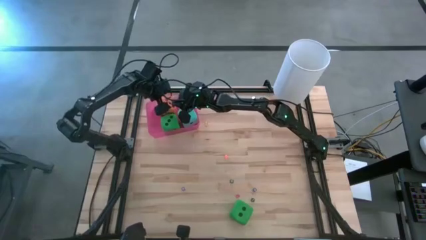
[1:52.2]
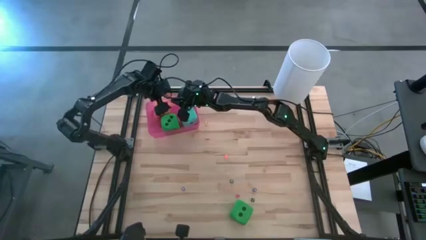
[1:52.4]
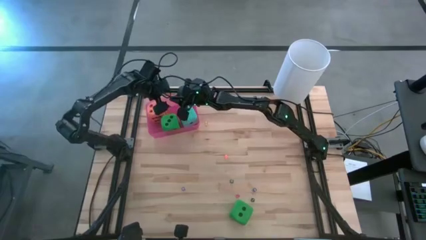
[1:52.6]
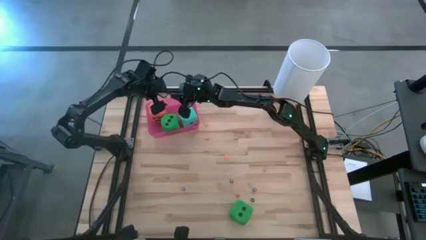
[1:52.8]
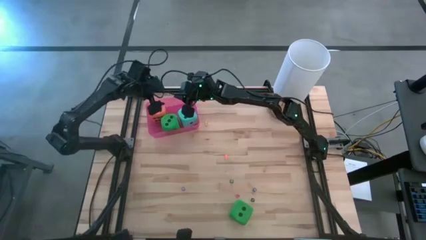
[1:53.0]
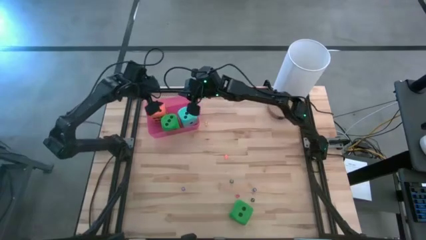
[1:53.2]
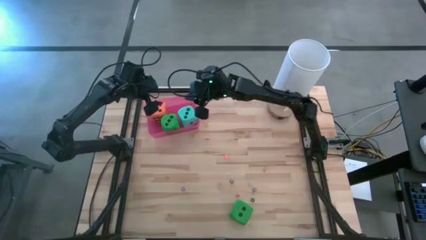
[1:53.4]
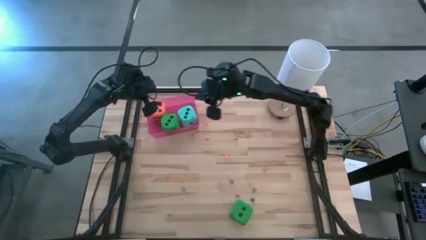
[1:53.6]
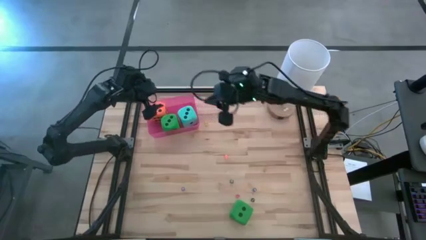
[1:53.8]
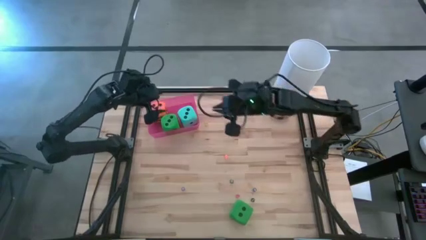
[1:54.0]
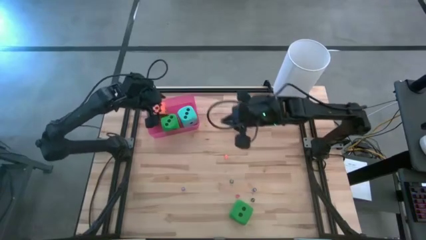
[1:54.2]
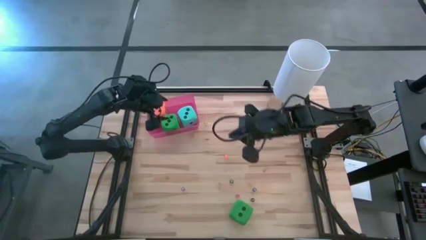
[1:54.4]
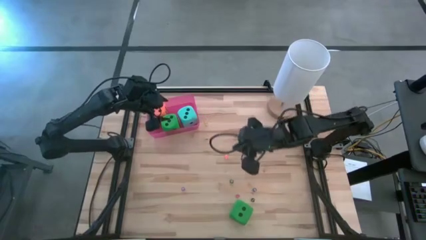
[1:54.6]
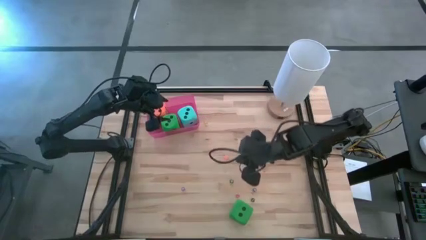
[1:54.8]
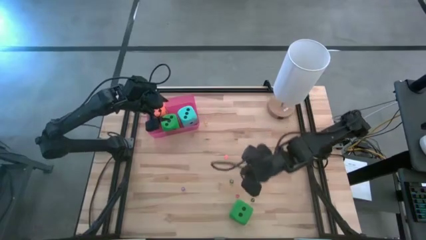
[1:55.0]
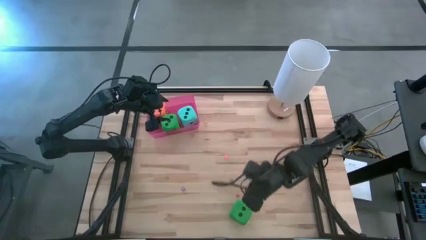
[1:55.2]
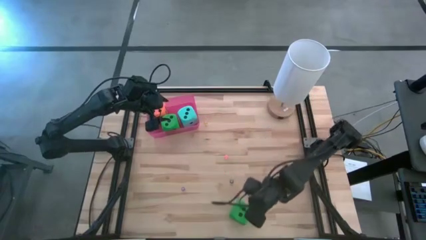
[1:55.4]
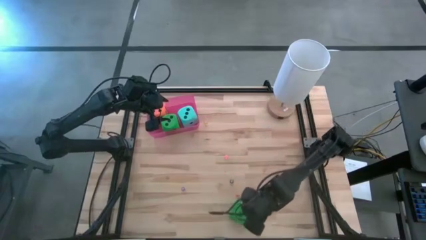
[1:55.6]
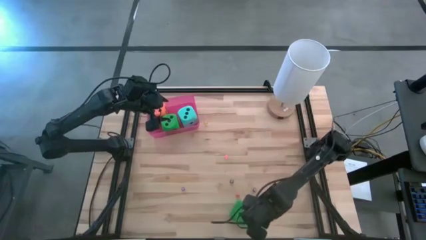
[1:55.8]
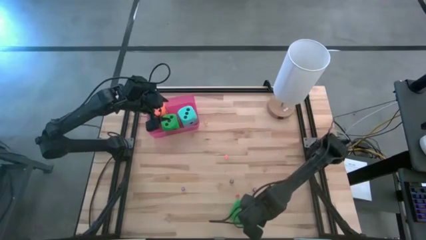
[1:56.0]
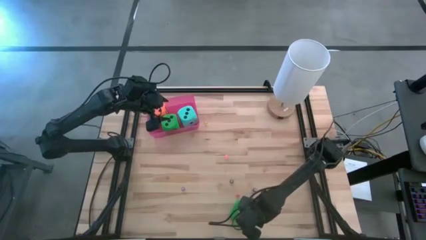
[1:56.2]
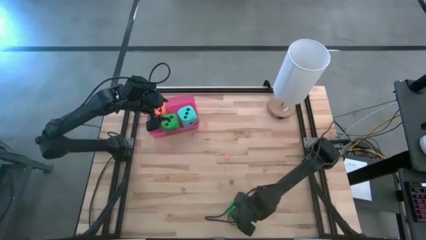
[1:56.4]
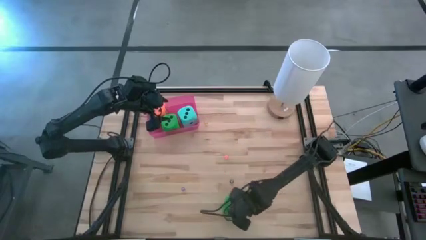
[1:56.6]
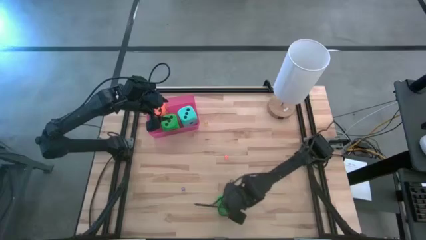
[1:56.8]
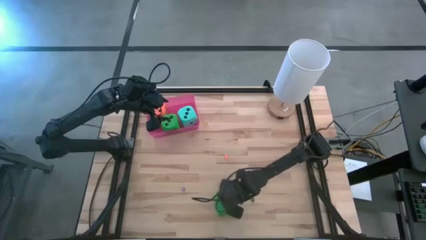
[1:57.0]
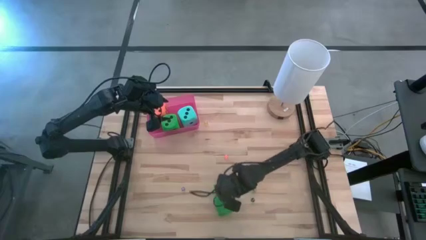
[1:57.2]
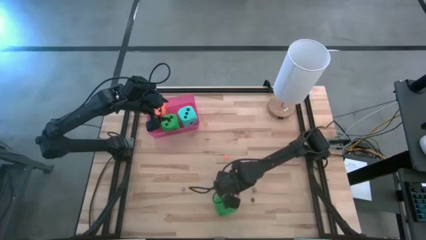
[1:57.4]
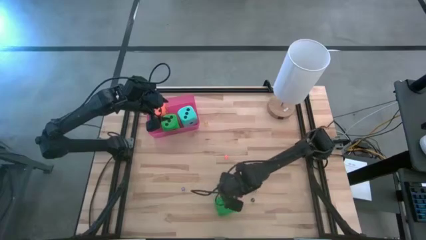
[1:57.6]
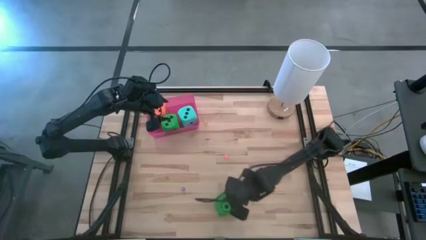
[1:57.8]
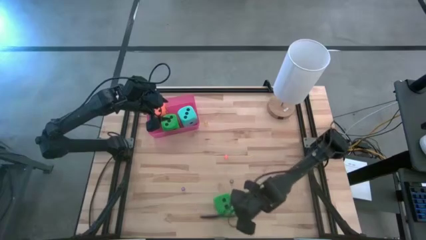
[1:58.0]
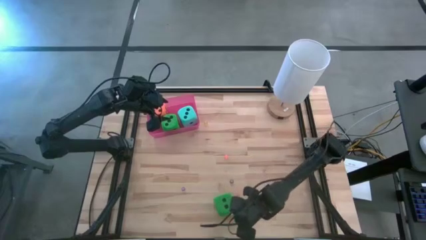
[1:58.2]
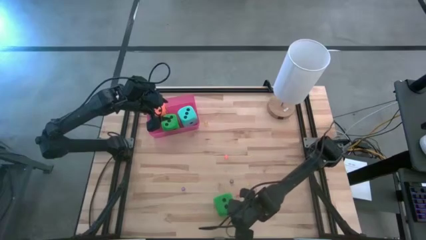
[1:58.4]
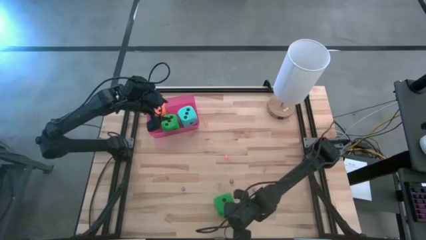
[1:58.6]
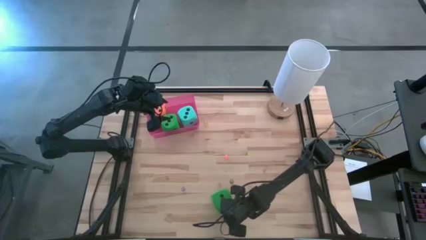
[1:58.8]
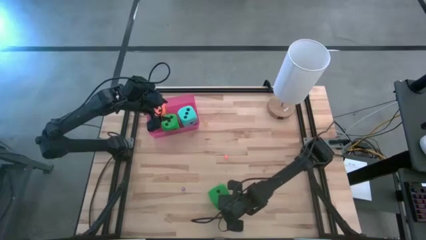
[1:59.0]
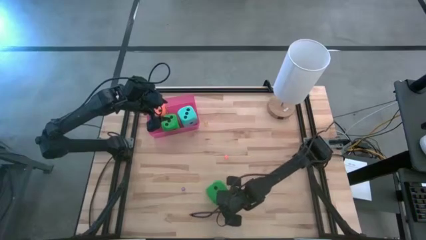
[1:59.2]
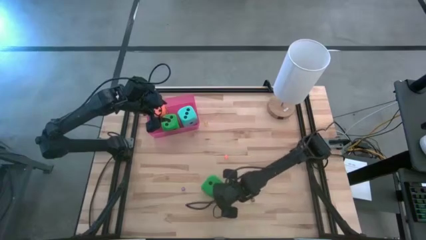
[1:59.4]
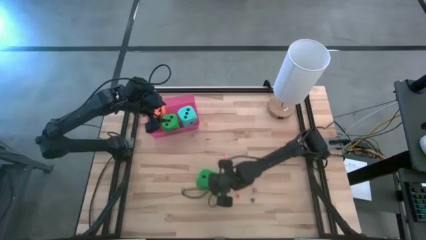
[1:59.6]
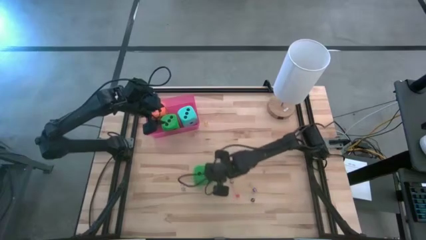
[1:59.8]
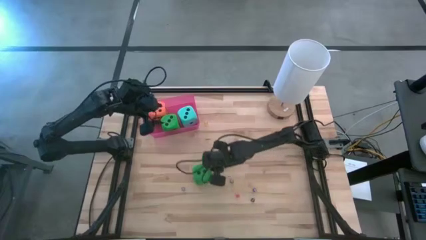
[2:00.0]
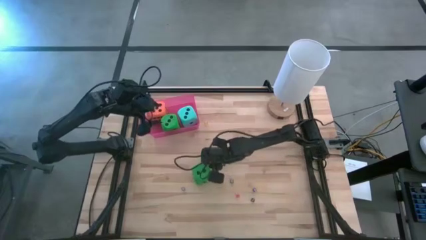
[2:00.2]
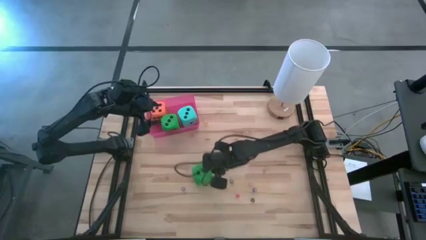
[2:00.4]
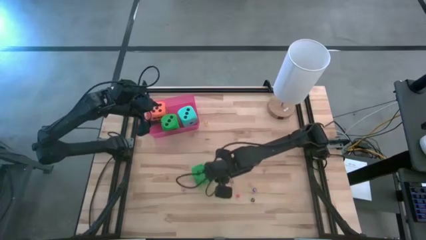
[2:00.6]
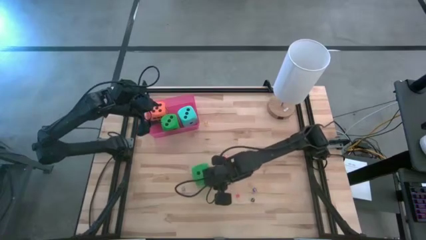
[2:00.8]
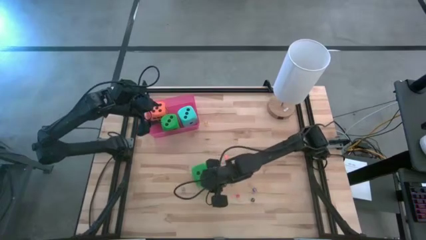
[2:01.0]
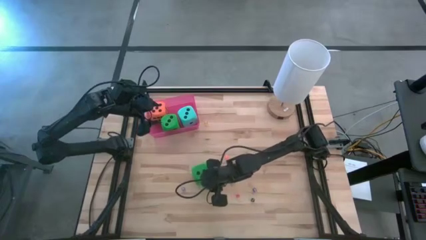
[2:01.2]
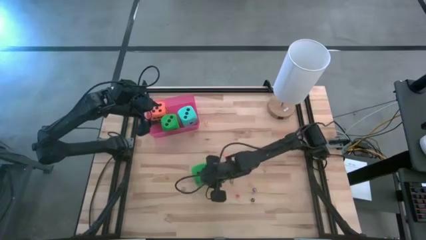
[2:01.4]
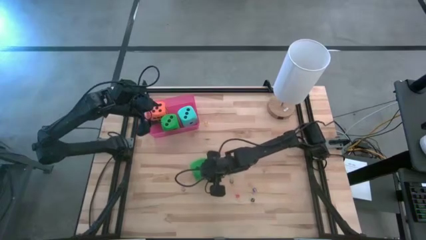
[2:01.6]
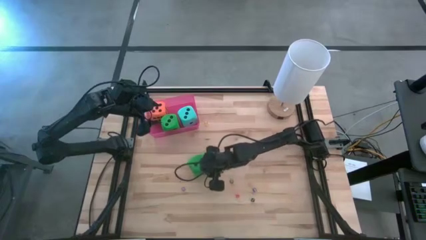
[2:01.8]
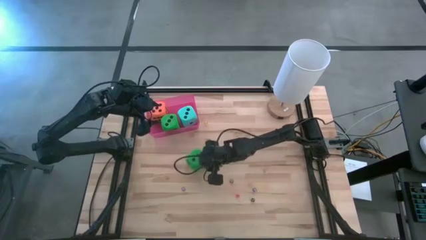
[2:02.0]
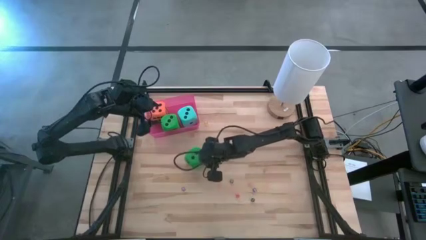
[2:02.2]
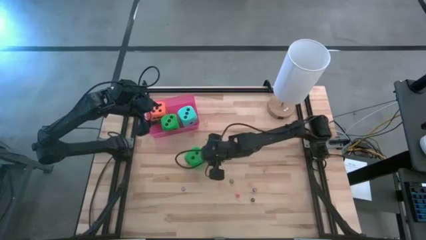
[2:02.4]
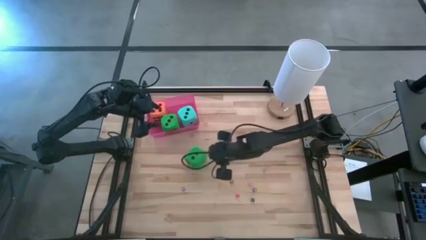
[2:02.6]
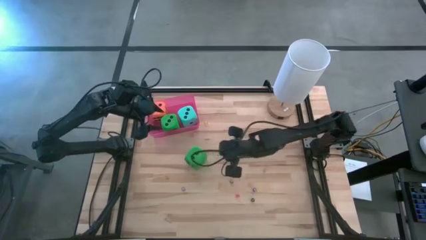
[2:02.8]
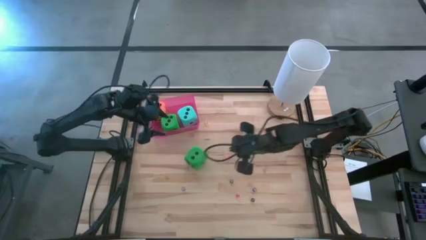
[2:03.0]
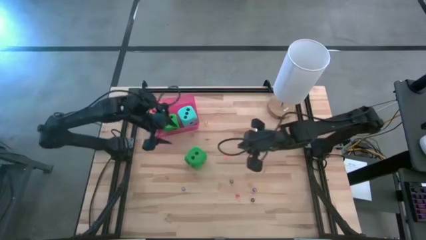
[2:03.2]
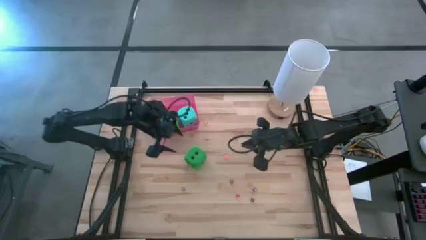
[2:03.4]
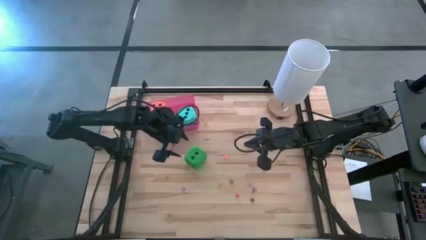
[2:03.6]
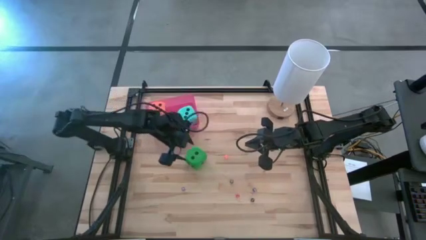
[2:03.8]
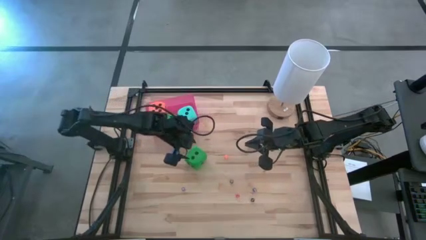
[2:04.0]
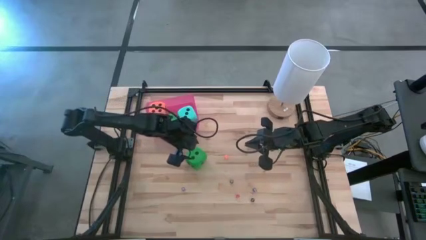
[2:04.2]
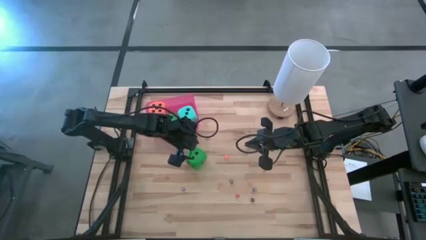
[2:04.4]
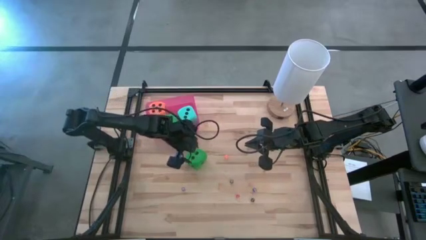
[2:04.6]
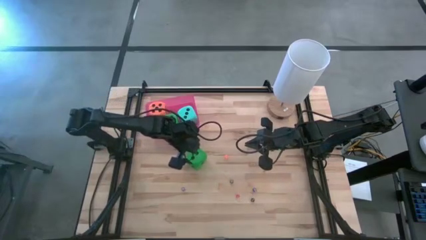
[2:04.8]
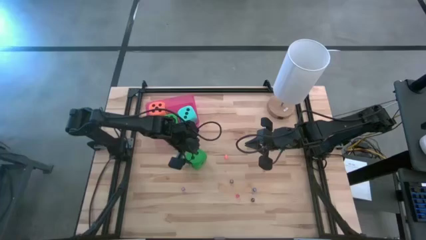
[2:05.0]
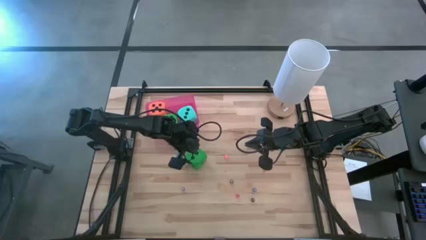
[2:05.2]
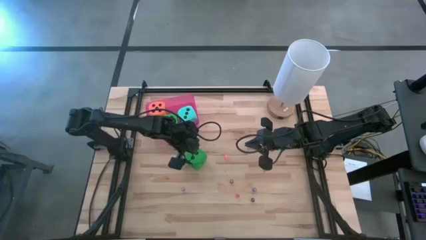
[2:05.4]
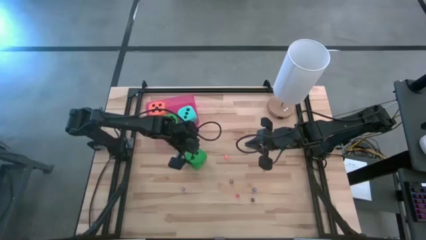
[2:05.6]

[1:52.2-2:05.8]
Task: Pick & Place Dice
Put the big green dice into the red bin

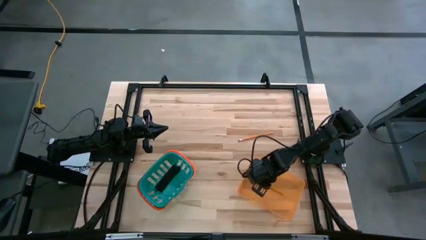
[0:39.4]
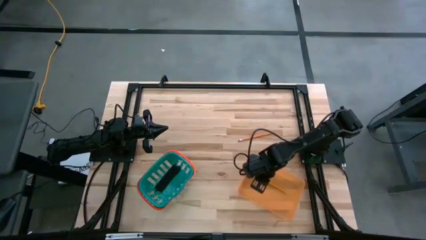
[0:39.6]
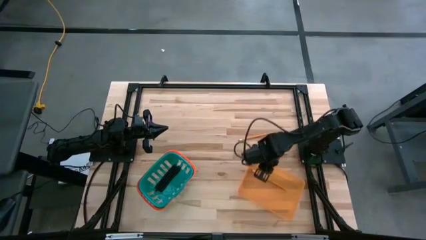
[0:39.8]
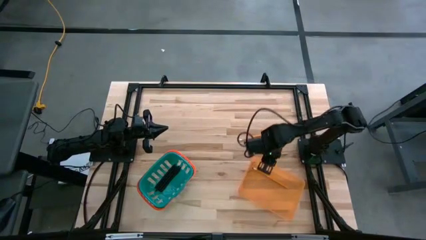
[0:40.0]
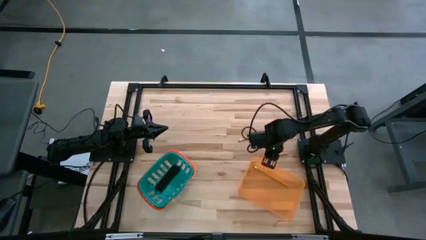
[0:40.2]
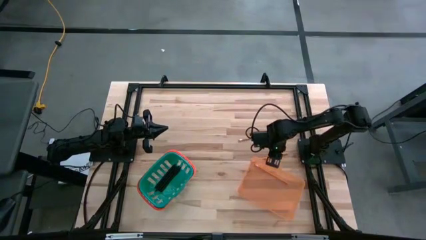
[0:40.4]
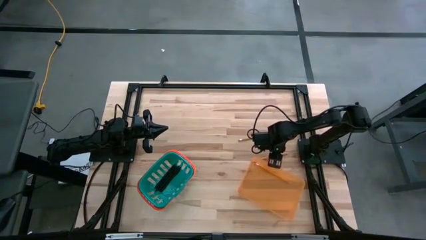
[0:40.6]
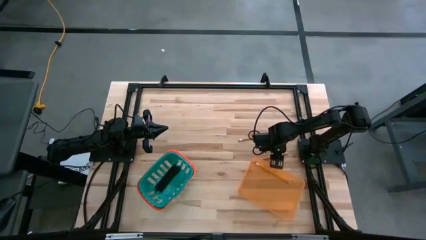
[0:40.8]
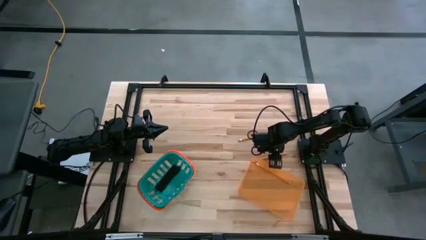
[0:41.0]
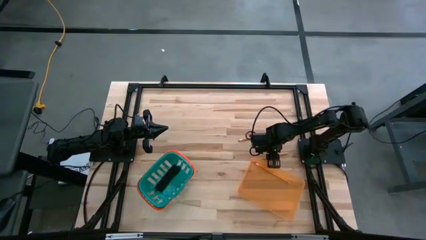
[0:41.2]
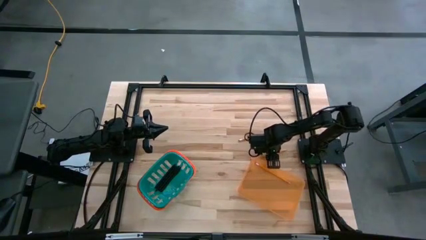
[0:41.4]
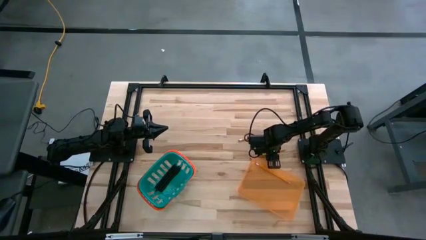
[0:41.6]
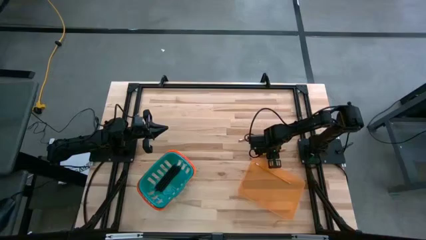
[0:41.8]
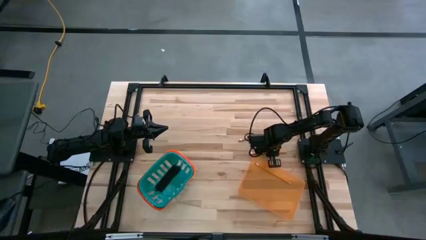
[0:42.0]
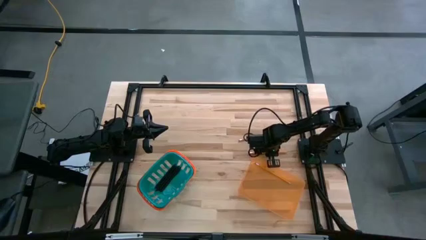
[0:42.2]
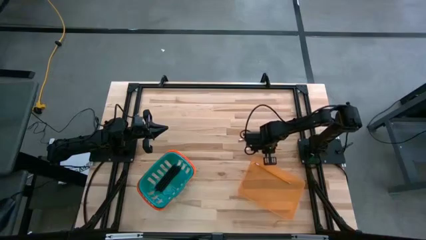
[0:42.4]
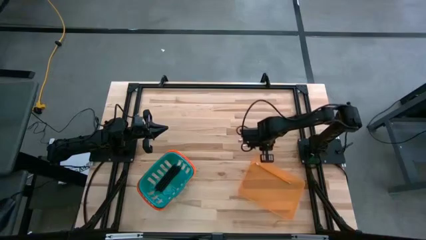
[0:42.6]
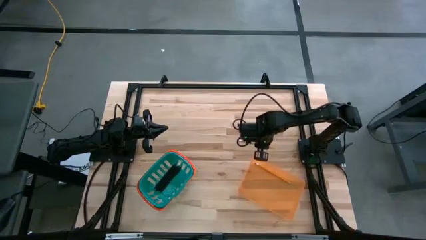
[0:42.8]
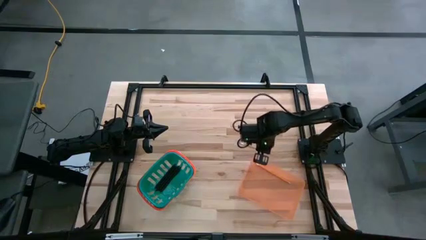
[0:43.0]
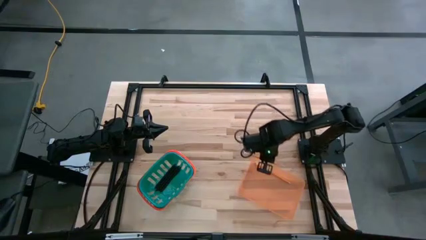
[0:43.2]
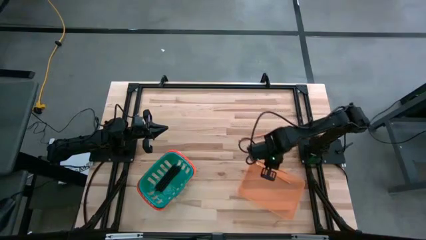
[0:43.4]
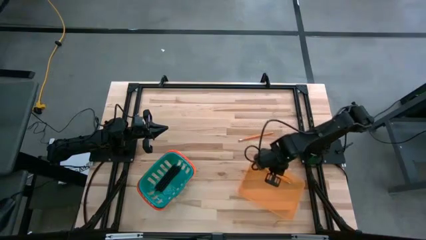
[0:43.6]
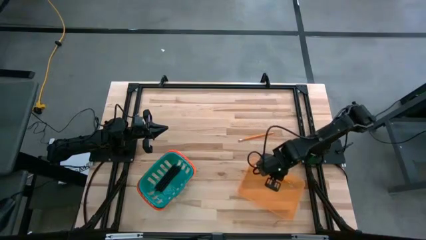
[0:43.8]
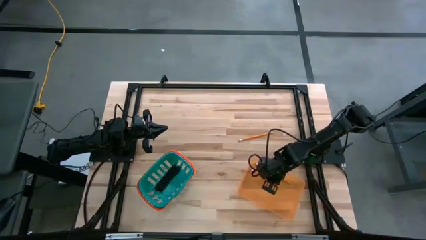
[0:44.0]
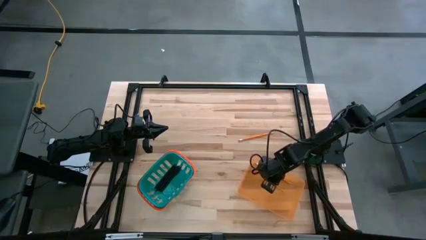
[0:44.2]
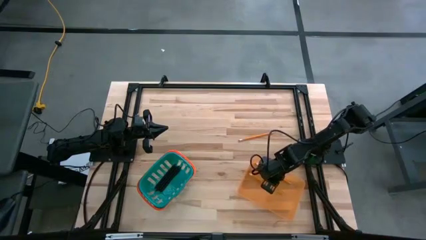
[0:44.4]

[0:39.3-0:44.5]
Task: Sort pens & pencils
Put the bottom orange pencil into the orange bin
